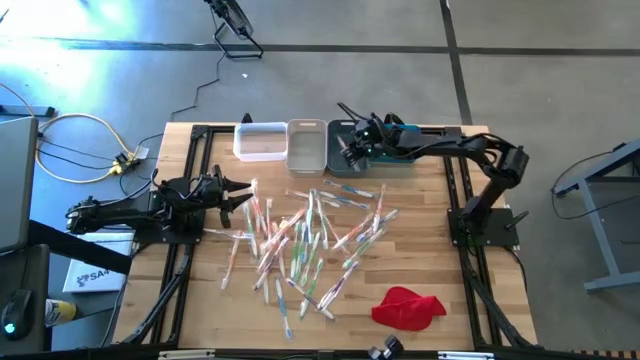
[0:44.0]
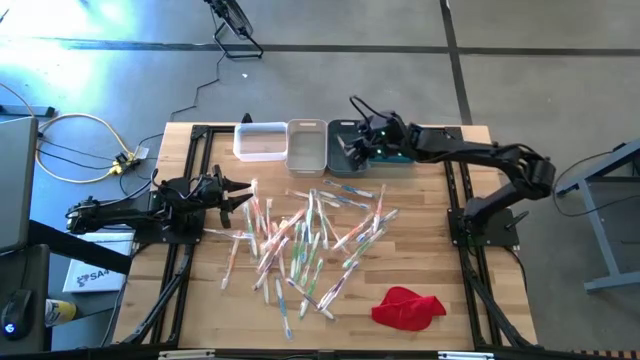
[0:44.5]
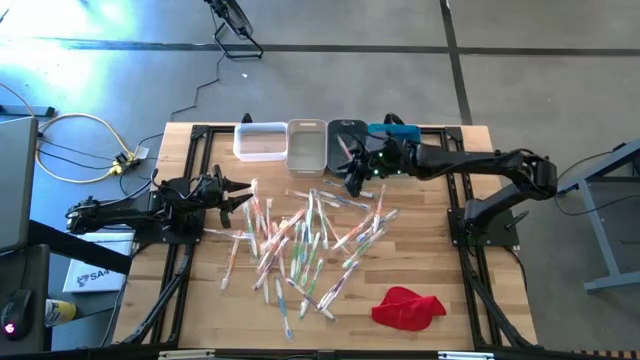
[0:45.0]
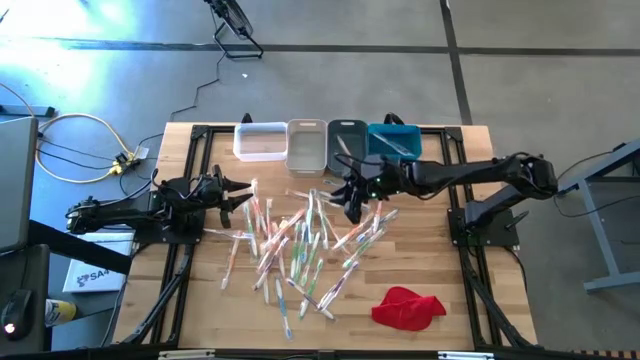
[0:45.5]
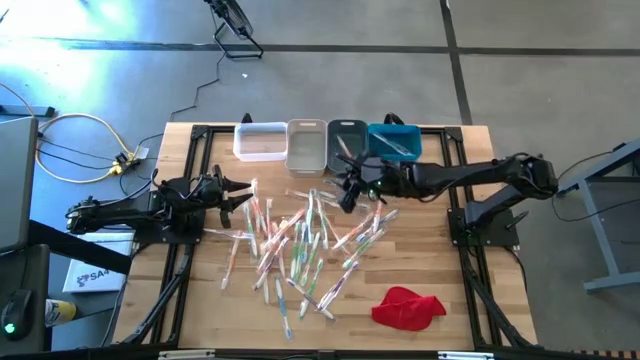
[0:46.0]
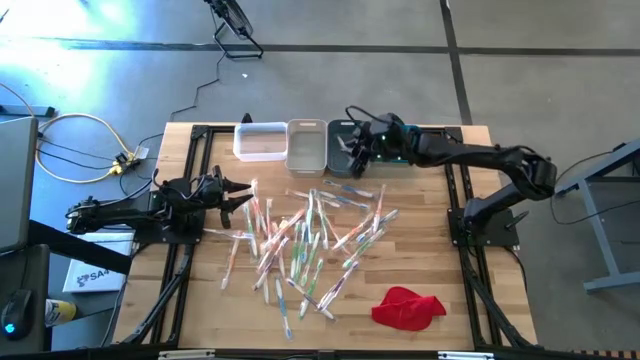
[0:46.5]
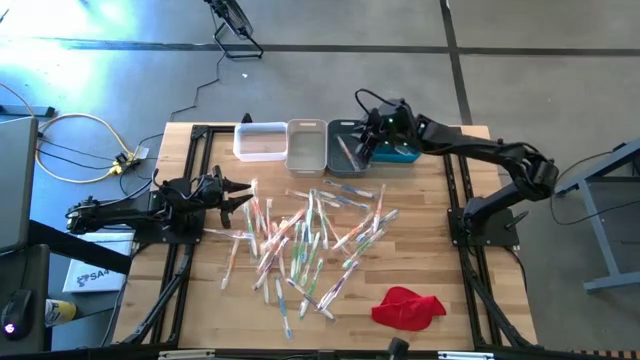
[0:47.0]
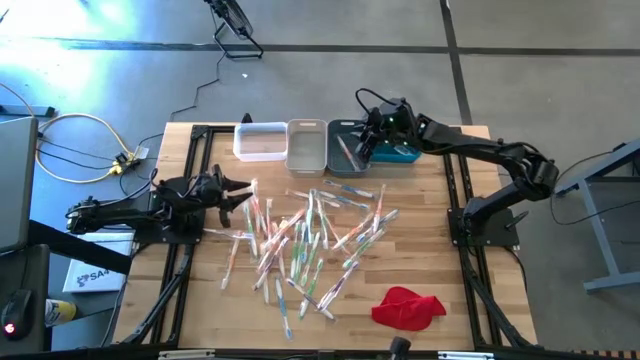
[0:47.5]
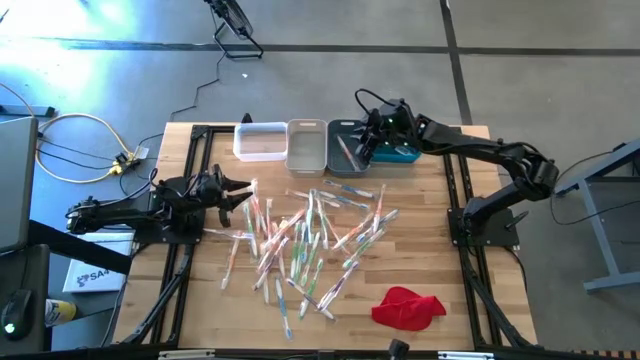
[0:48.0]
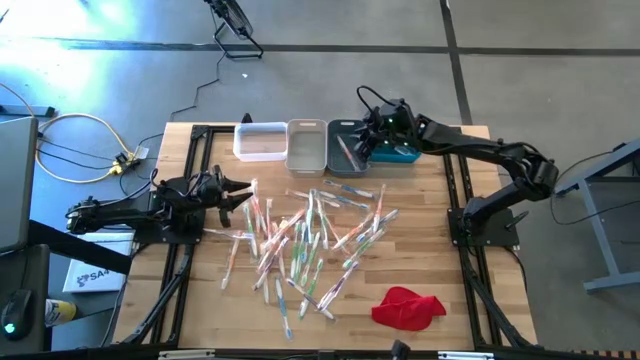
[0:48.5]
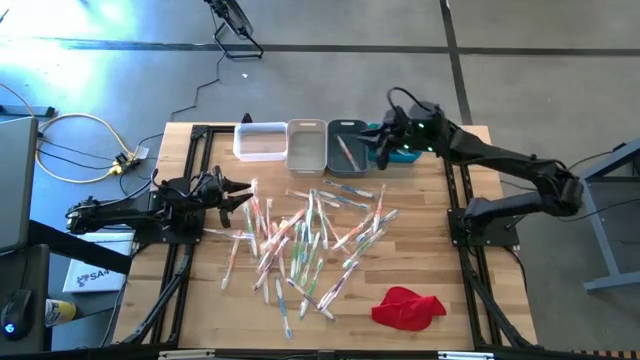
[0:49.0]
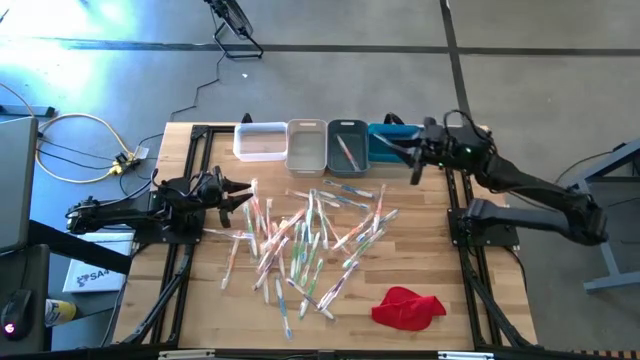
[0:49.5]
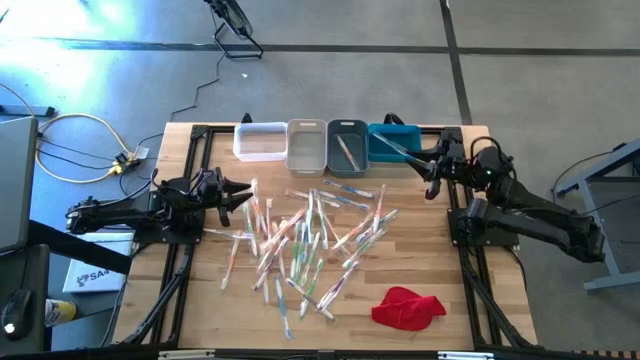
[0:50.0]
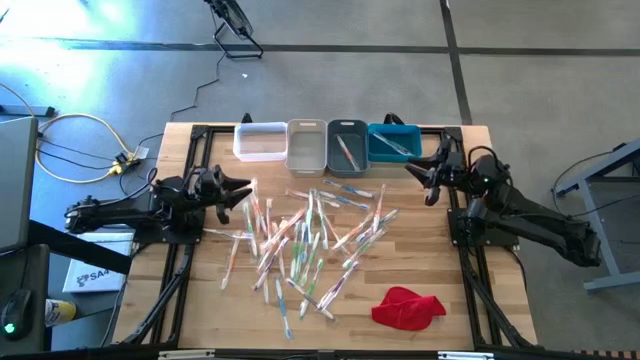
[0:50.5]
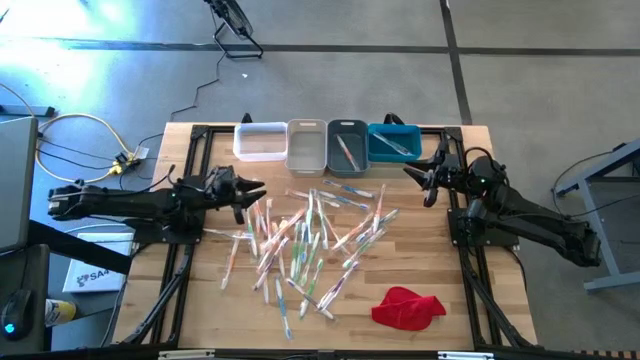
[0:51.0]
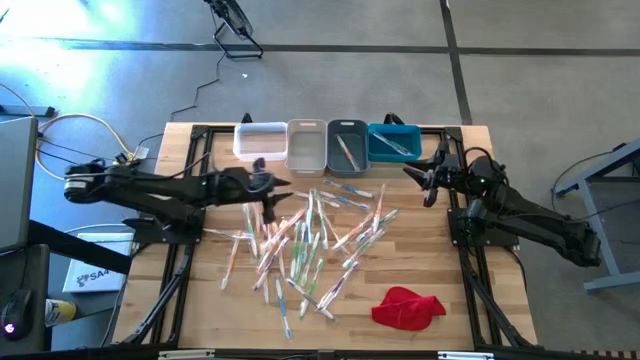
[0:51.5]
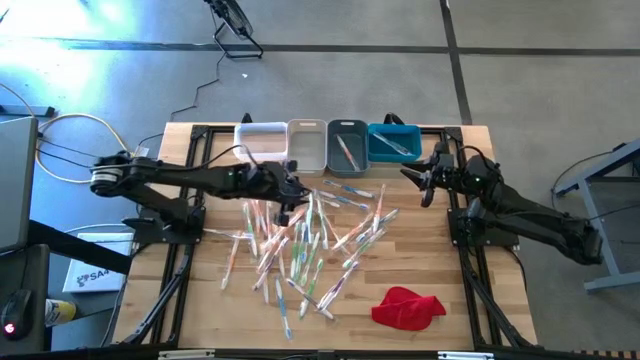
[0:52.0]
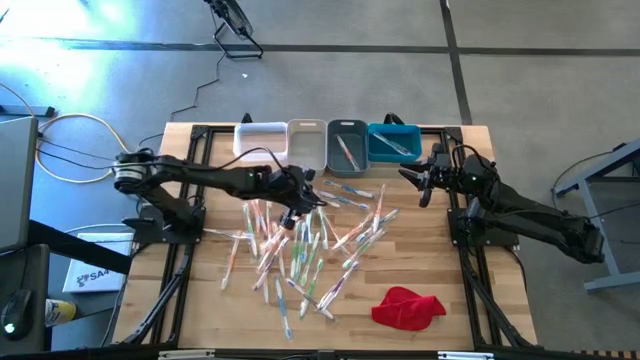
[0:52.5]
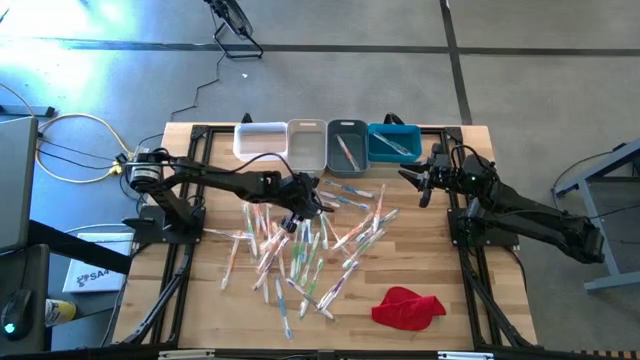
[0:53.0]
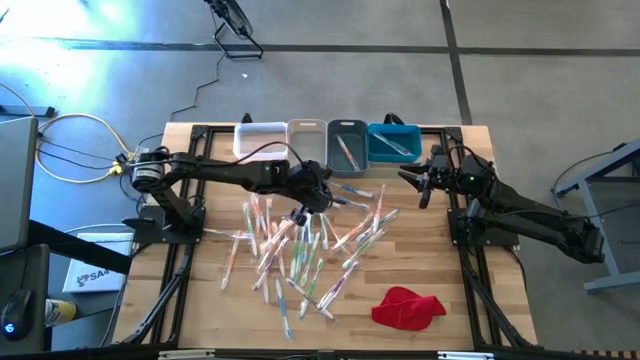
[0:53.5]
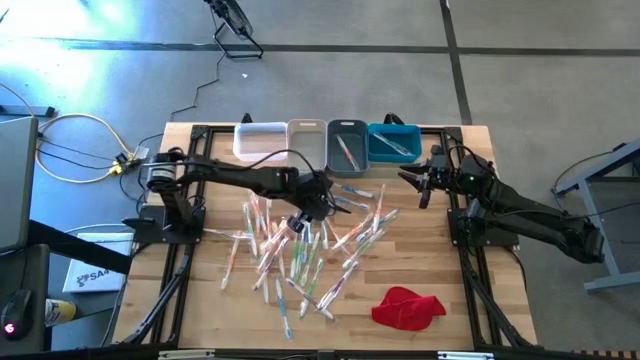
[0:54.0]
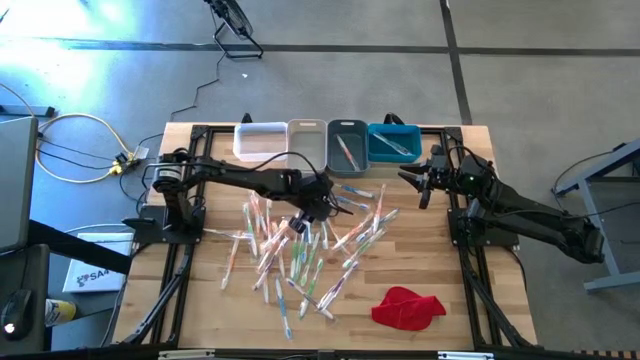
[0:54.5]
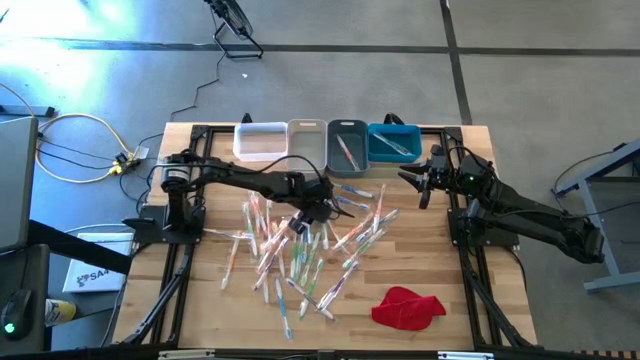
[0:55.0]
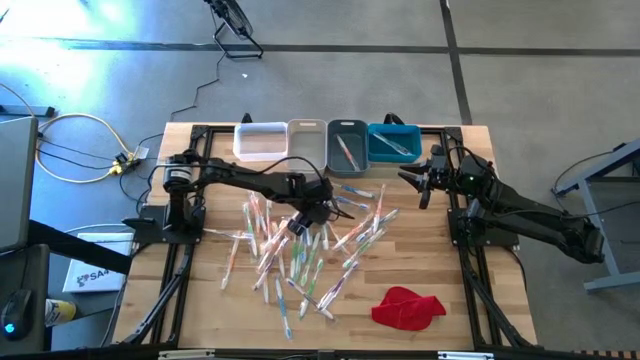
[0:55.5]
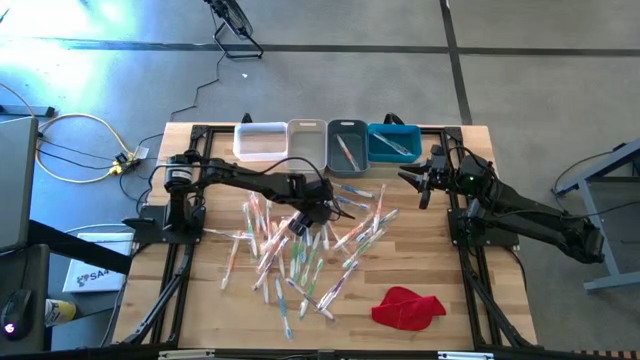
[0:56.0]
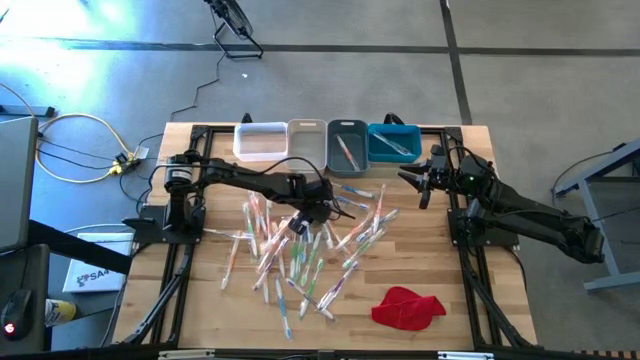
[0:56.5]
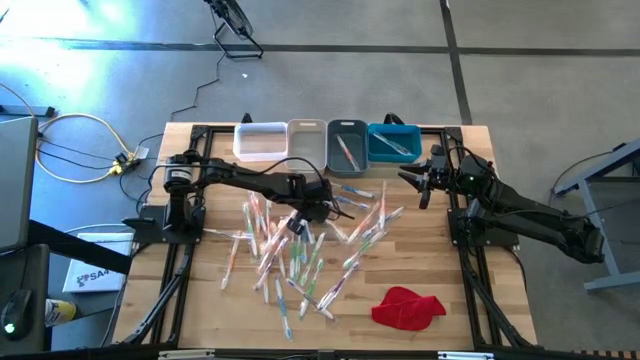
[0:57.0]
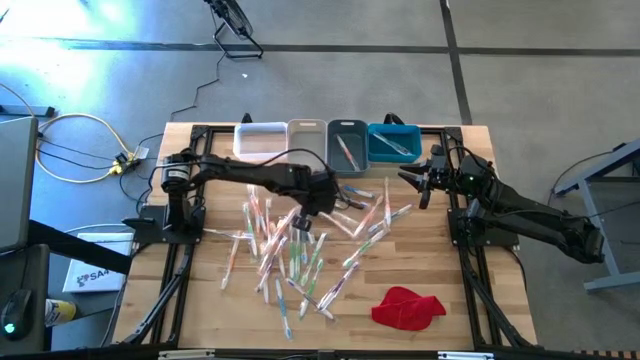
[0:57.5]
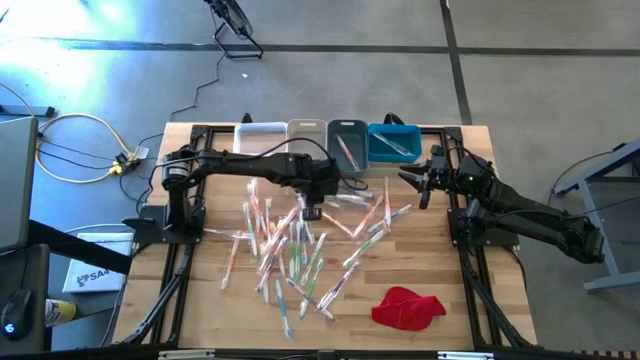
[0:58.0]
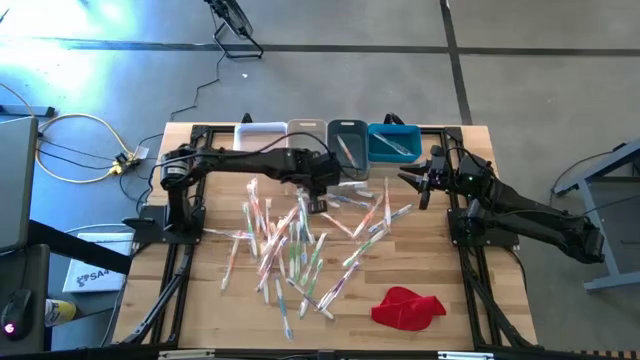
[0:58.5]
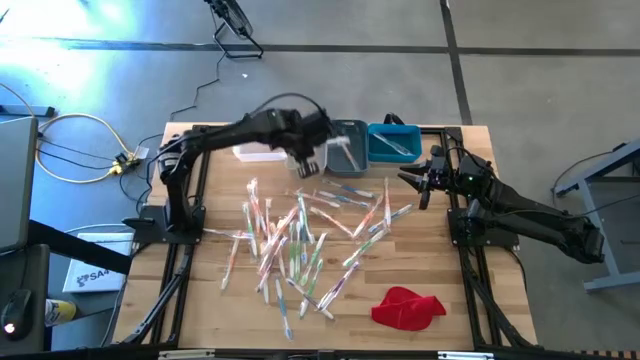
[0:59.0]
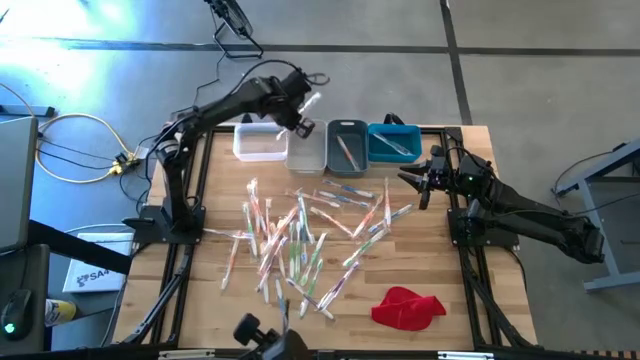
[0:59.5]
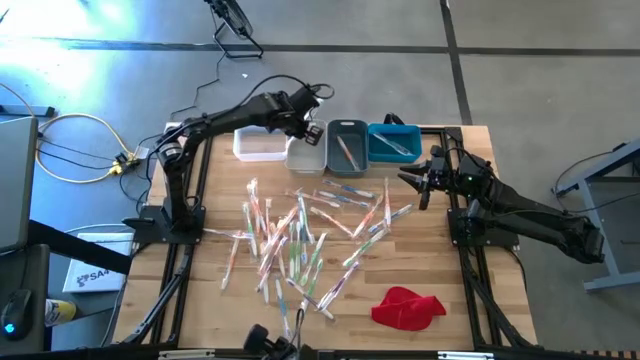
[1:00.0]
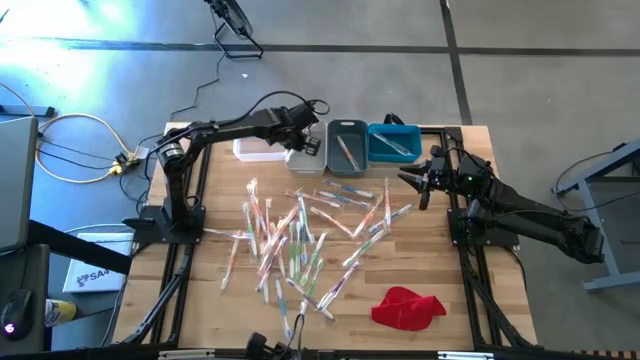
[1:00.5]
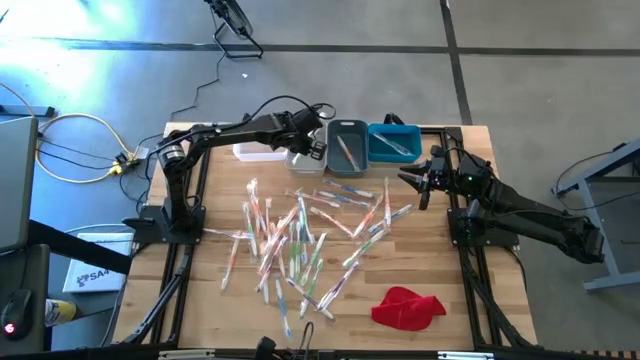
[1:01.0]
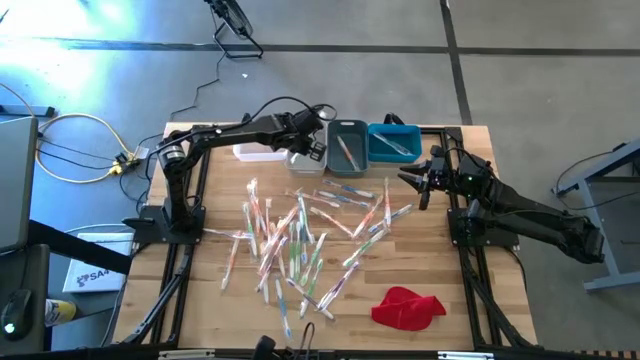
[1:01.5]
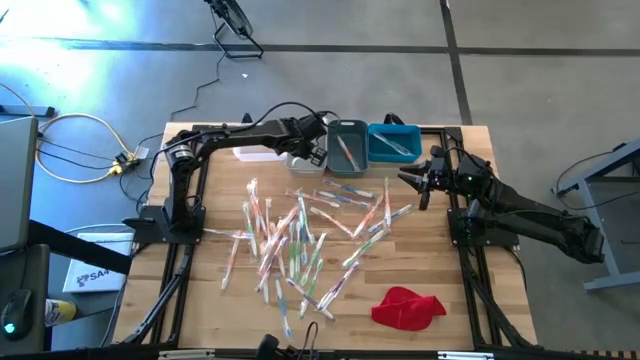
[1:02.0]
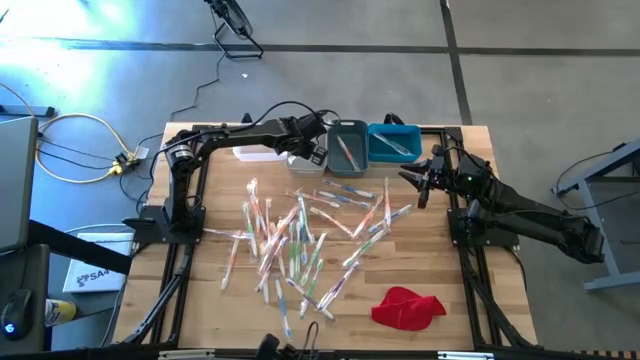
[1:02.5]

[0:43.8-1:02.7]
Task: Pick & Place Toothbrushes
Put the green toothbrush into the gray bin

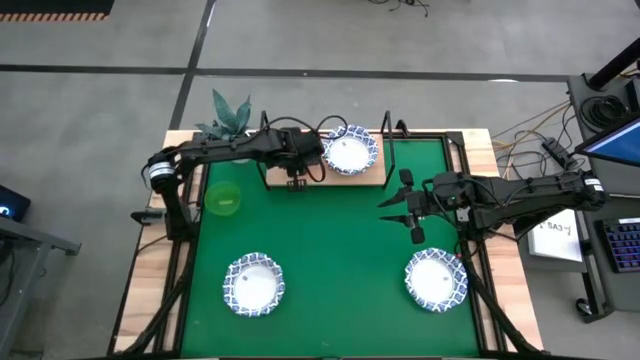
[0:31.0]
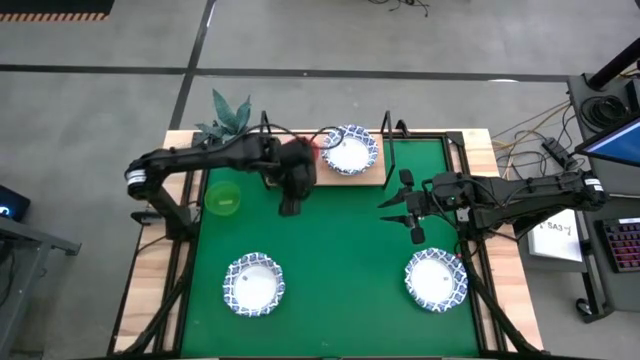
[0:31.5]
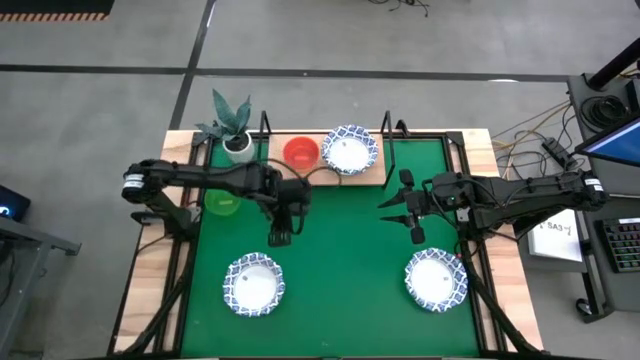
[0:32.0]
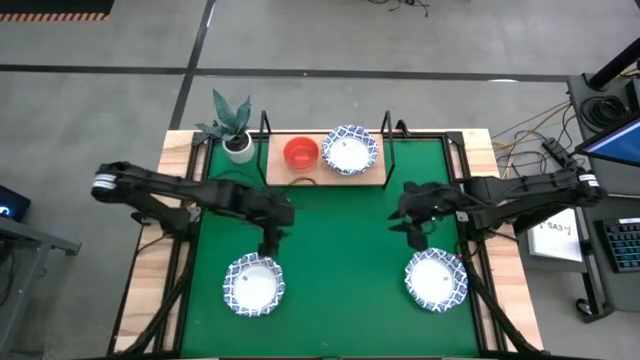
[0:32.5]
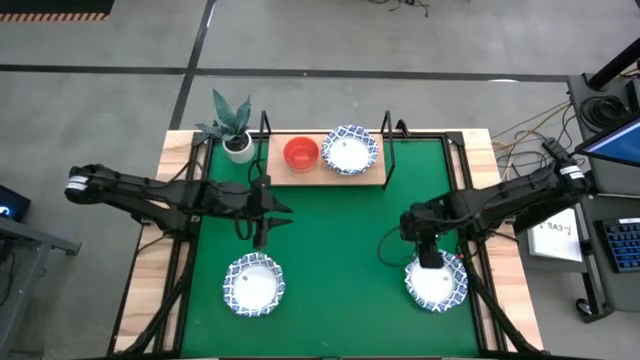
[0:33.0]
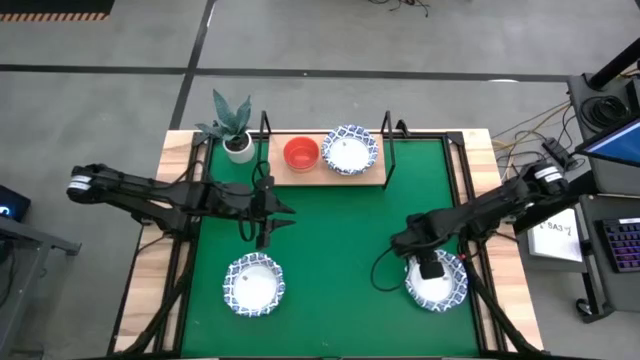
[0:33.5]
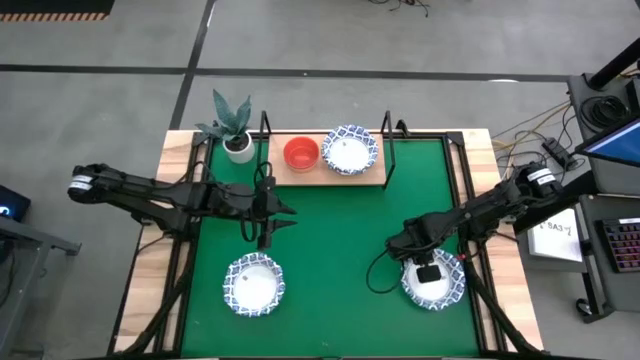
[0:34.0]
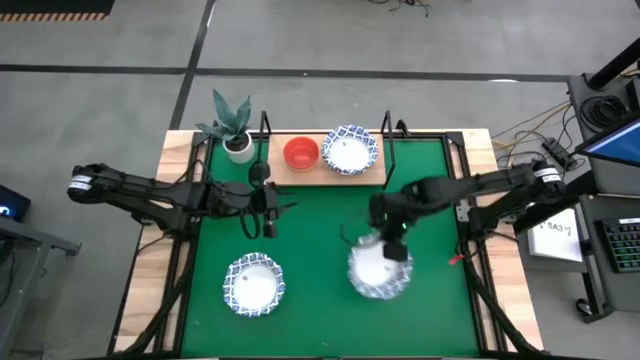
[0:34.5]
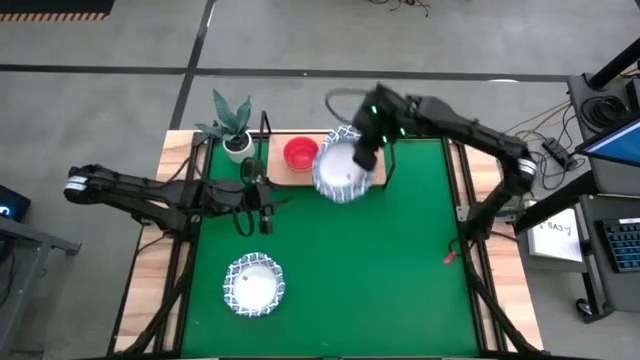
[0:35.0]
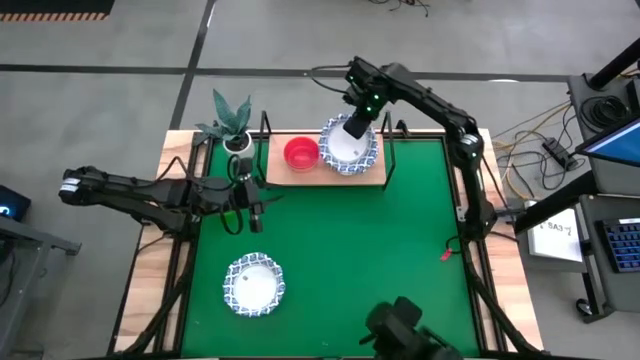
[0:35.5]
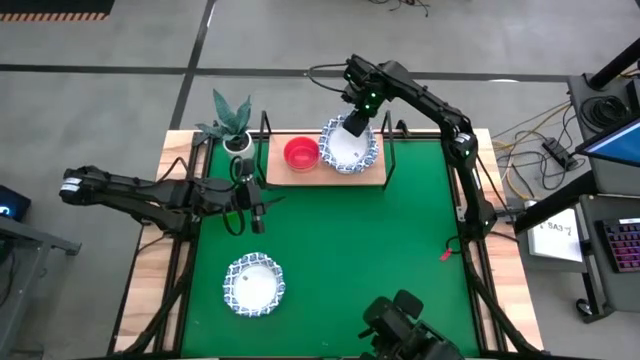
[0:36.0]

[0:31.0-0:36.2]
Task: Place and stack bowls onto a shelf
Stack the blue patterned bowl on top of the other blue patterned bowls on the shelf
